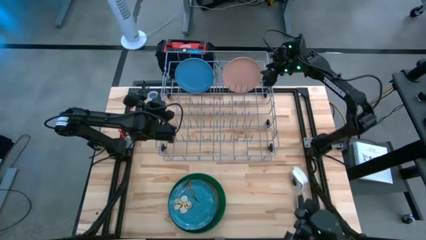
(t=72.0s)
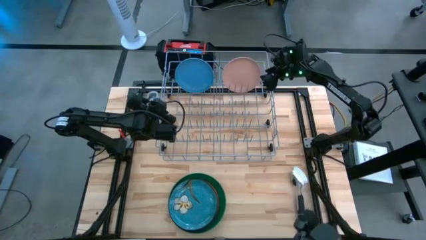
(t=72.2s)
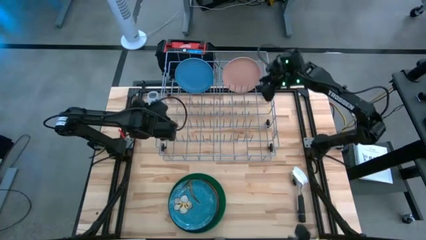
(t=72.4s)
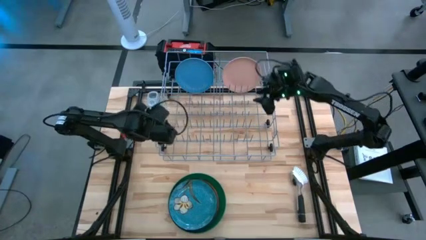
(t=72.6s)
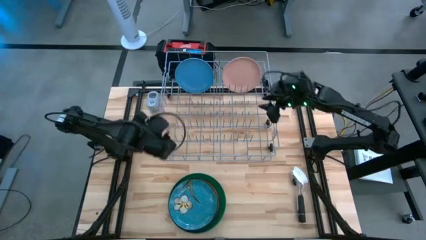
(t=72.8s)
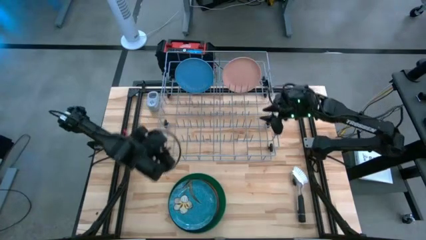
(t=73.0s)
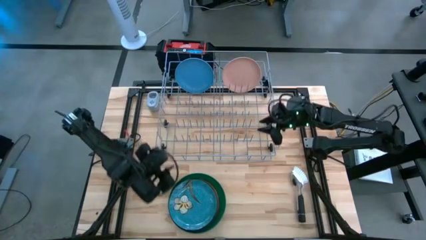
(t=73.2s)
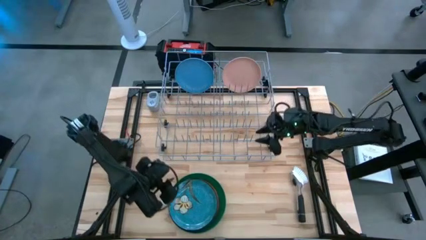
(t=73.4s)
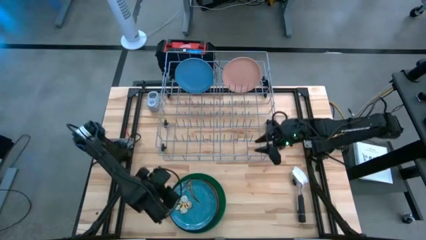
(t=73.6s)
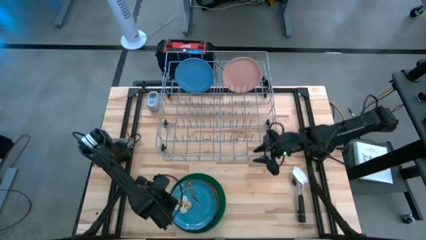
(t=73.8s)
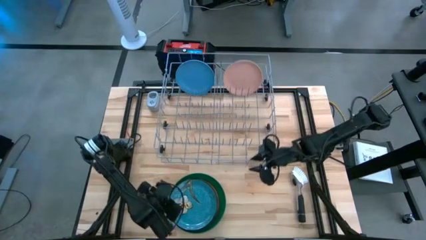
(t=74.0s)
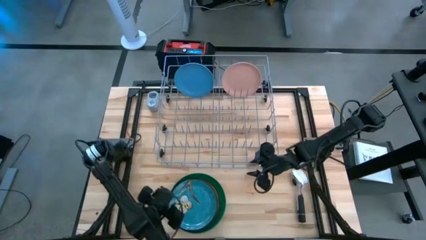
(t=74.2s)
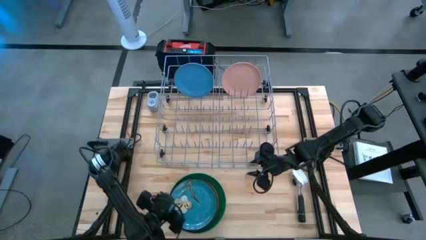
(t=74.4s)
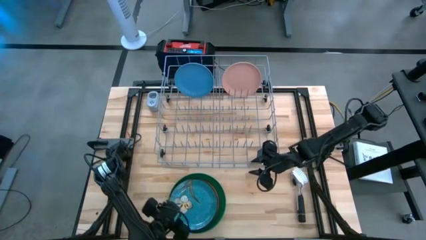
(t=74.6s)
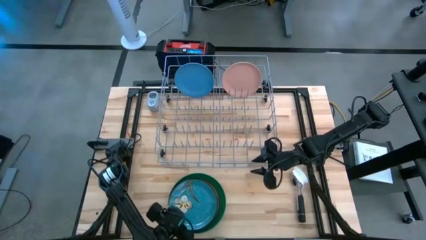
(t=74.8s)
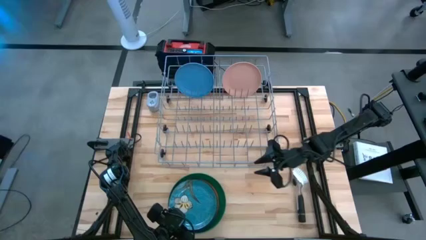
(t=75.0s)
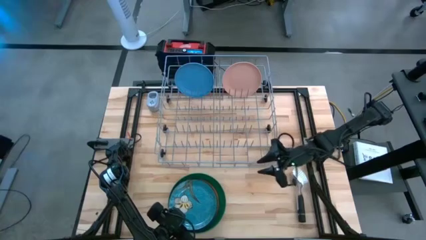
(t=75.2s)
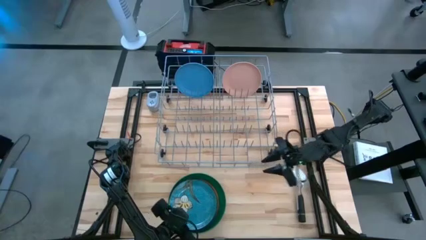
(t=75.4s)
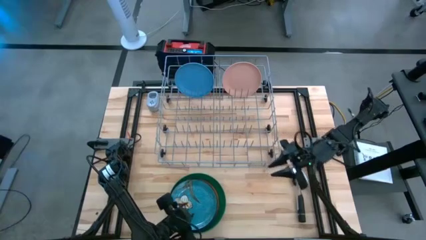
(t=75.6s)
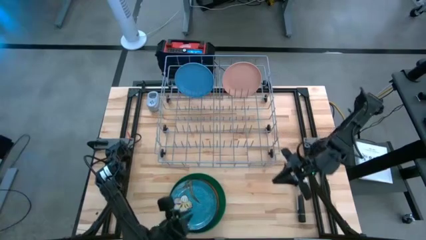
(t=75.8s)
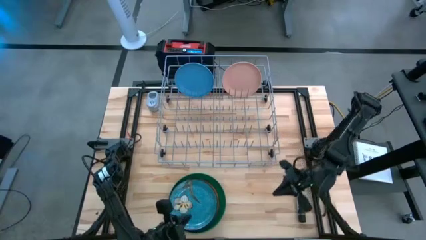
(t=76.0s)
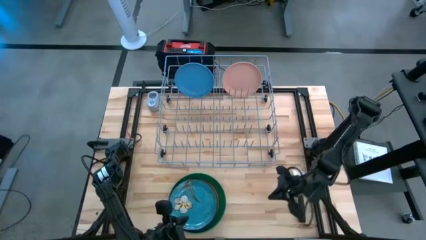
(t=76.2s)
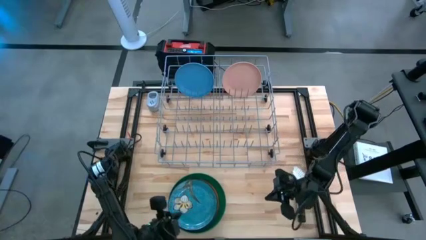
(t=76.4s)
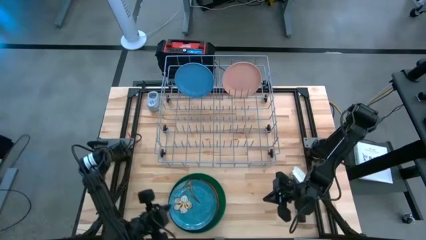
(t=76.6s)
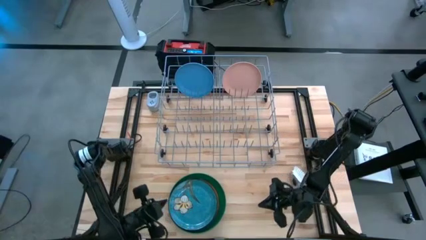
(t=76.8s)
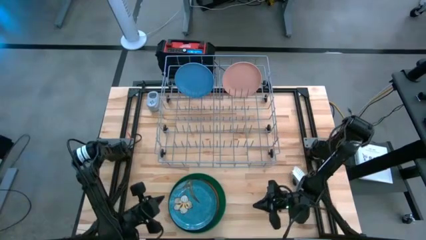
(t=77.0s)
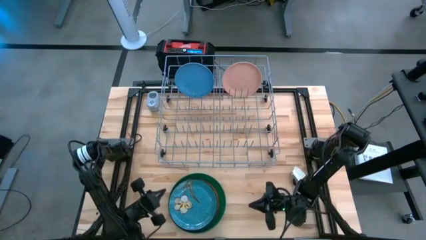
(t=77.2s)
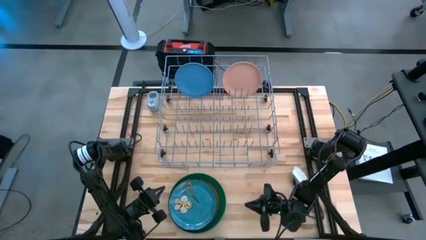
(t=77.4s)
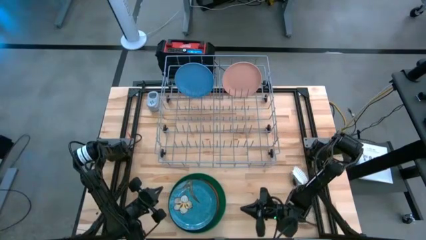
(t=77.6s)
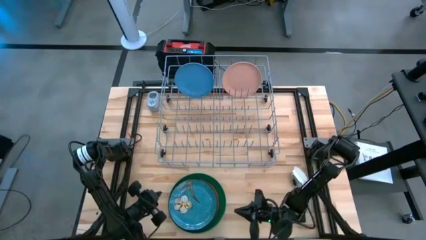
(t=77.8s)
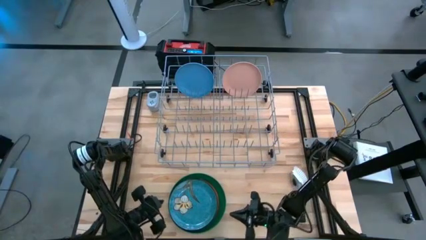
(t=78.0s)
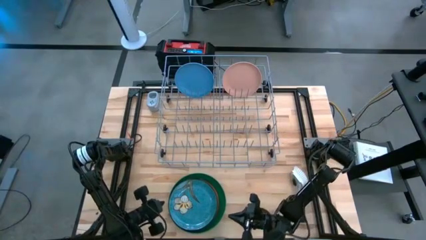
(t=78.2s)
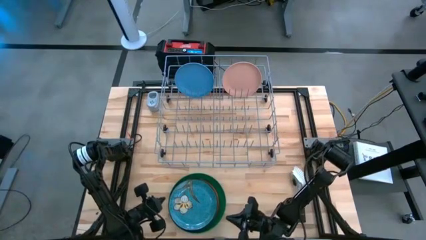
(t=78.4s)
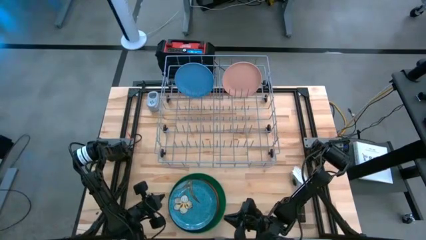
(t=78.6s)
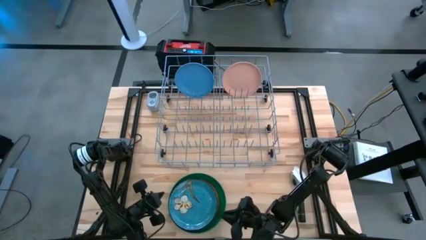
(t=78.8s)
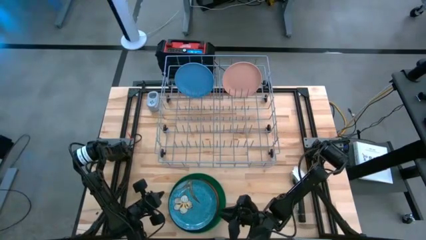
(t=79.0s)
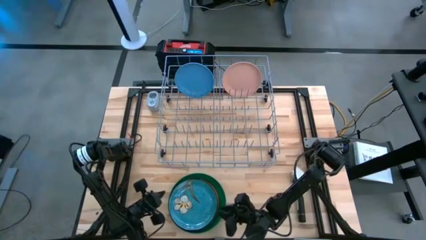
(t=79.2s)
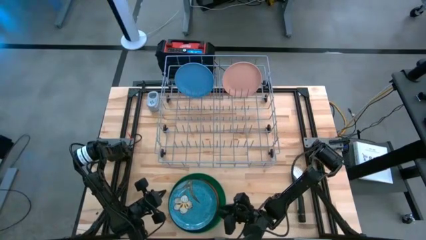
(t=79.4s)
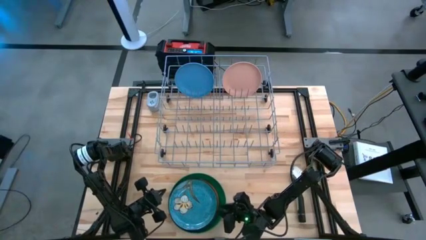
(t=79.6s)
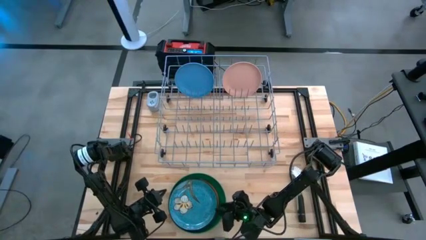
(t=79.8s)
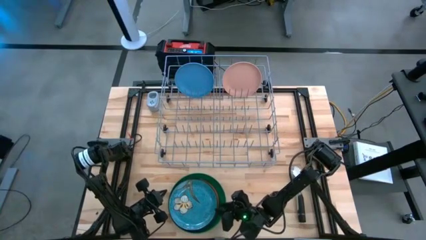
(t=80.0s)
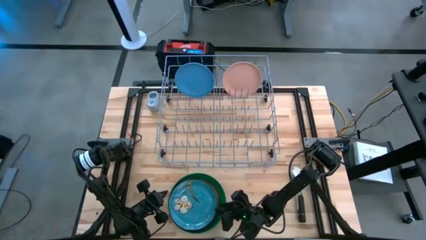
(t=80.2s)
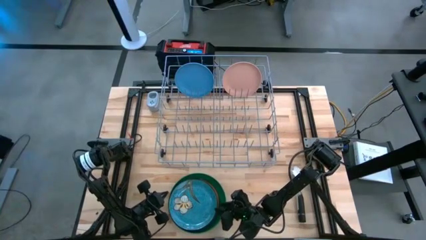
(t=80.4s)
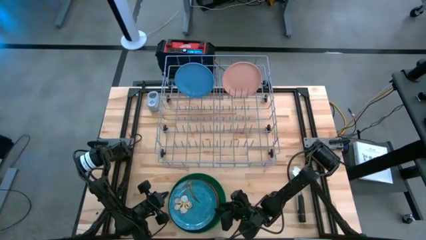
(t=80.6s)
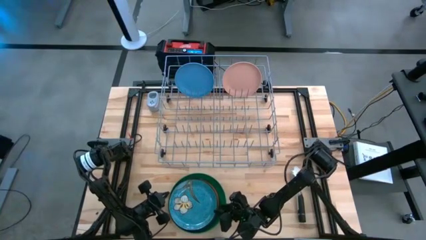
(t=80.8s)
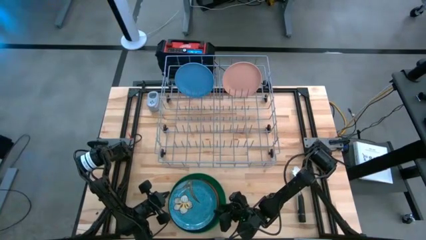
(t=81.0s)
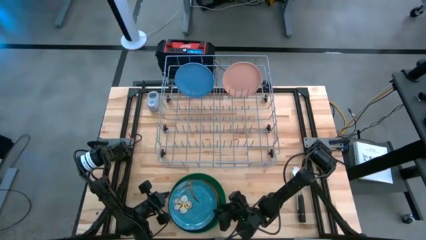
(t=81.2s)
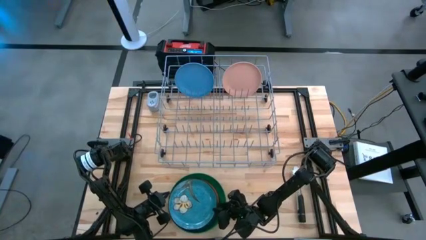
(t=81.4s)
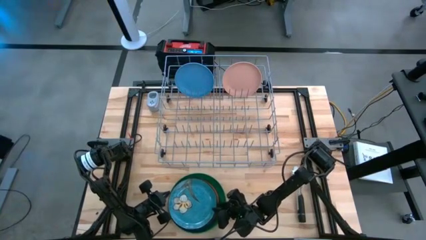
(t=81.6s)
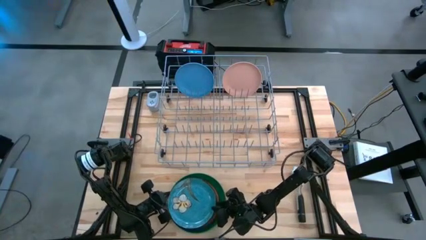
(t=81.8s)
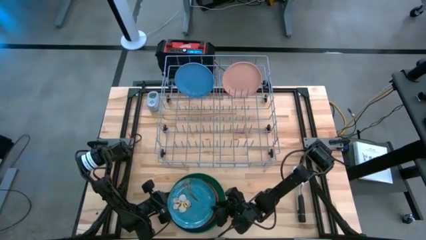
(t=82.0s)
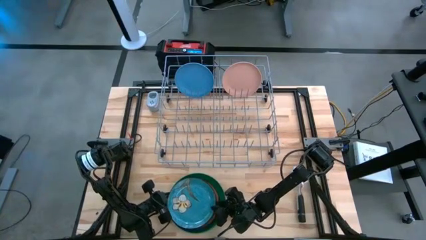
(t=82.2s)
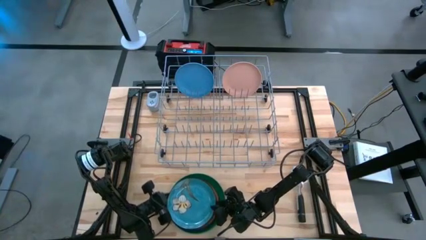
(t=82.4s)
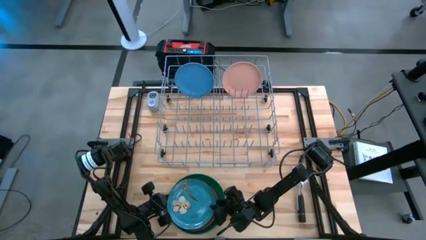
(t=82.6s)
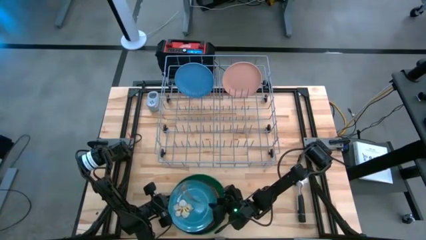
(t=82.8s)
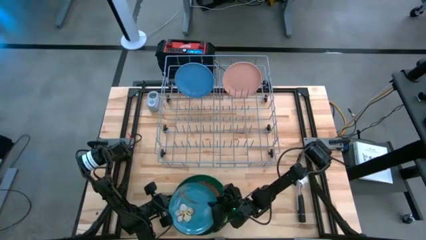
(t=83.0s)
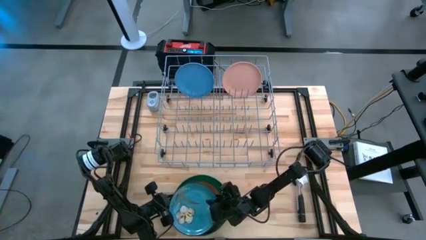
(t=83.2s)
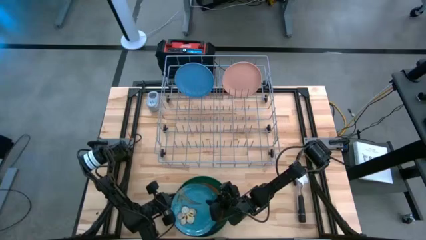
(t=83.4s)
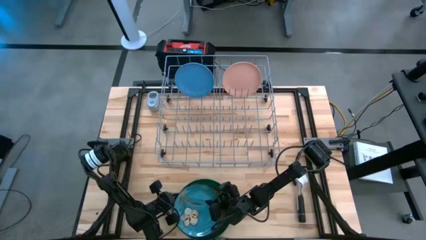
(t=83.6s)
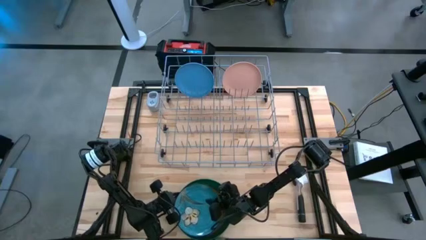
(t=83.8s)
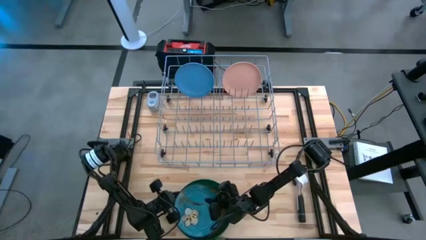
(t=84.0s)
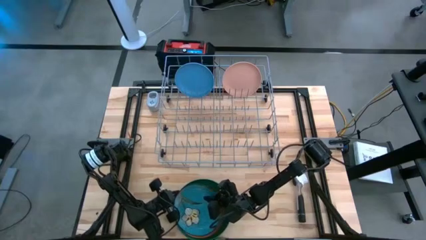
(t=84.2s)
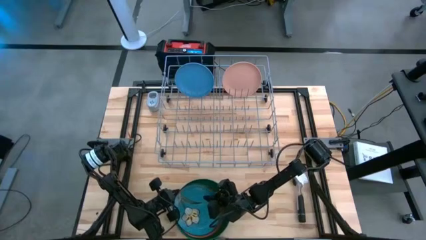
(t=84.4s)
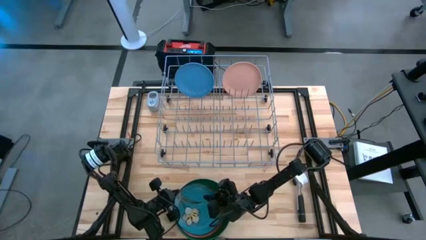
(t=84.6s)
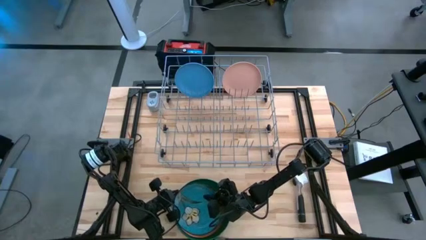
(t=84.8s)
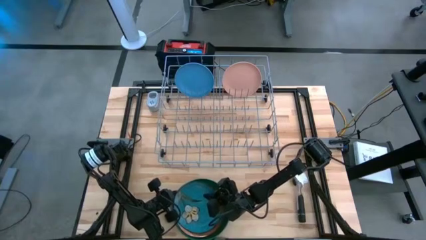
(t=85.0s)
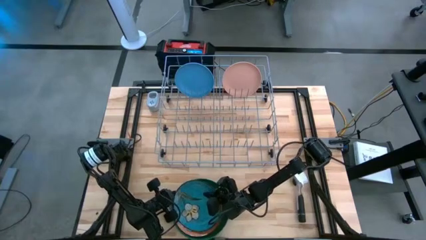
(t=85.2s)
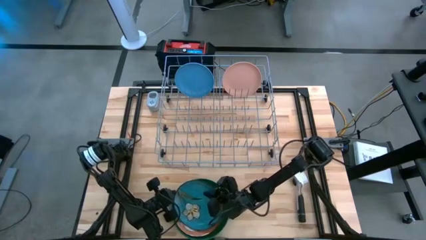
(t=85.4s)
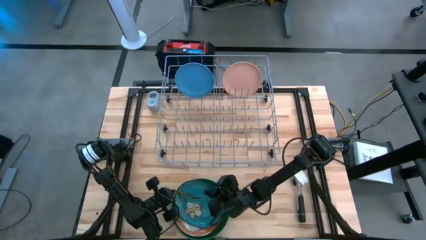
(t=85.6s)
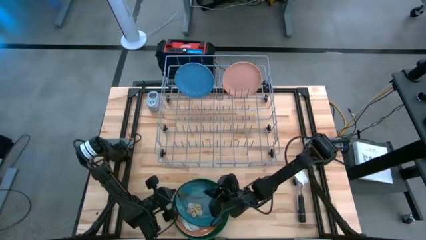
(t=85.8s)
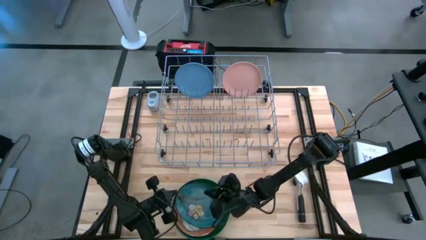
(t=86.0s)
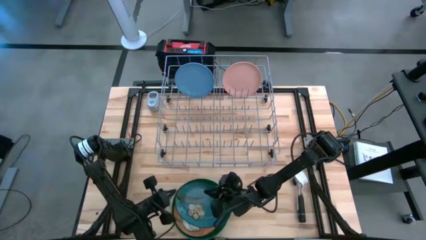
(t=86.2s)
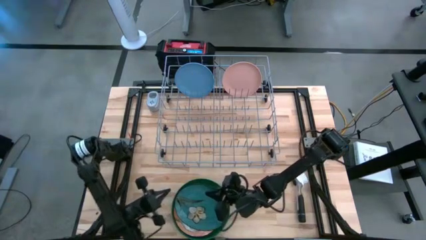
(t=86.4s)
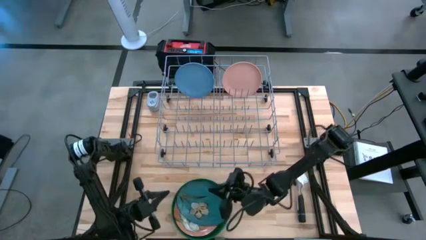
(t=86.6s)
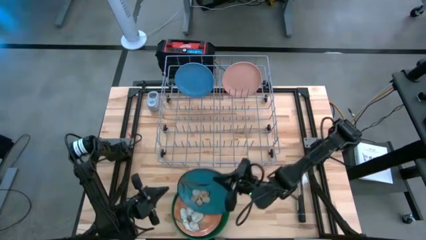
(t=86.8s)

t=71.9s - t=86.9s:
Task: Sort dishes
Put the blue floral plate into the dish rack

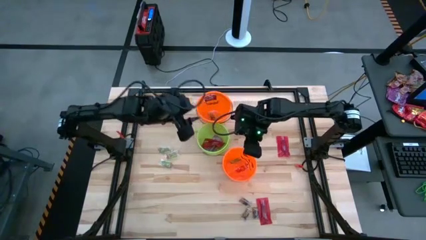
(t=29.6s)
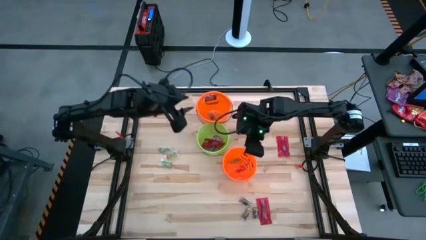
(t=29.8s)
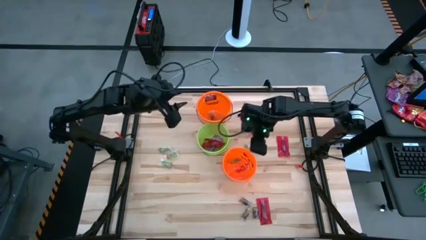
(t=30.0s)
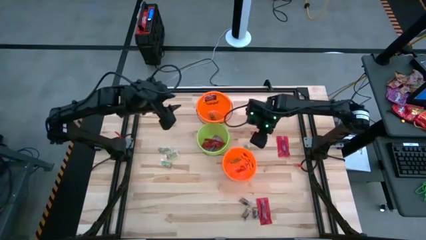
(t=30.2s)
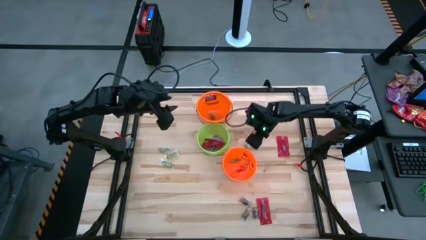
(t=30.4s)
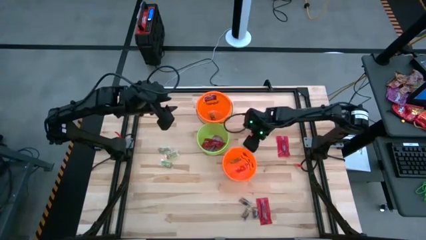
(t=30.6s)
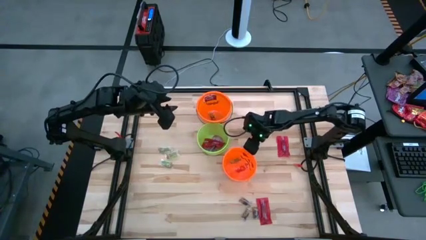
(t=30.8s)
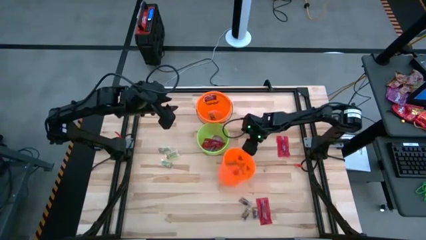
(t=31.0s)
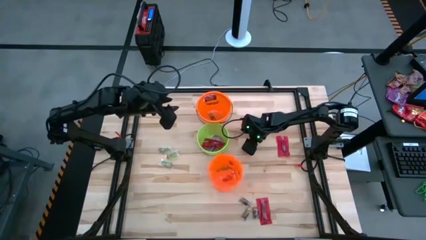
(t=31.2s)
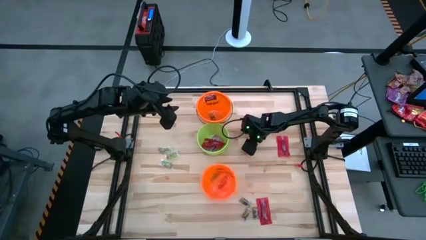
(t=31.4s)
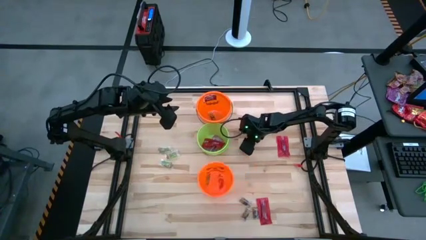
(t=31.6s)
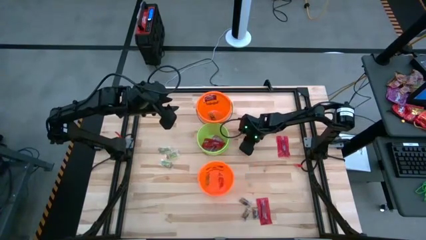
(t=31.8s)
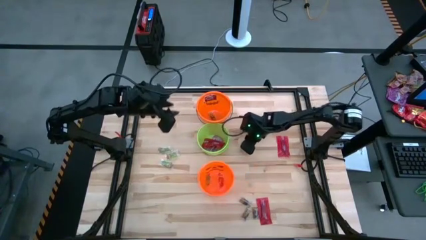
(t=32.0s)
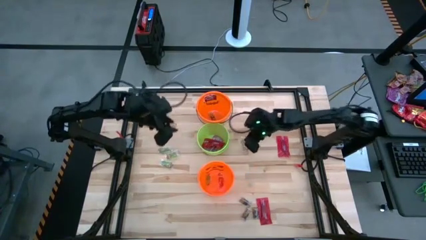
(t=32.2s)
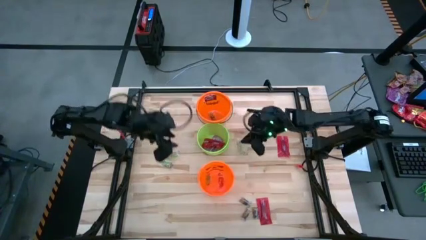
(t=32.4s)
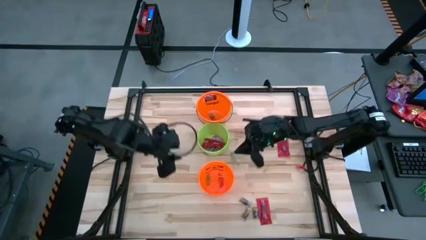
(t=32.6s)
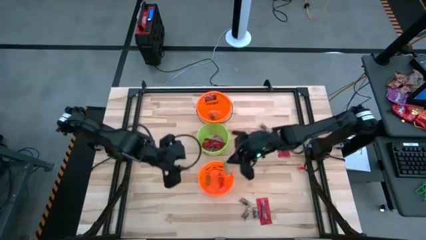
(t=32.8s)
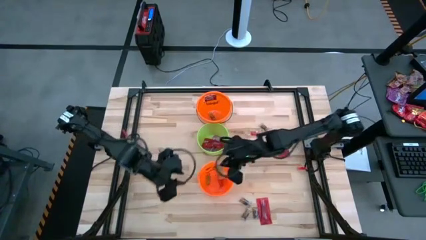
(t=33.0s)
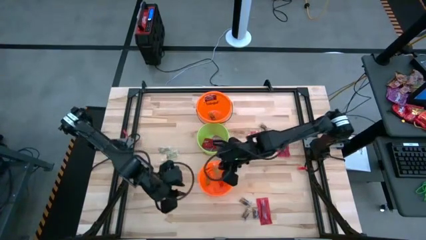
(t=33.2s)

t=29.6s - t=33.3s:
Task: Sort candy by brand, put in halloween buckets
Put the green gummy into the bottom orange bucket
